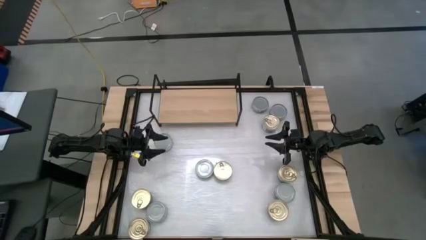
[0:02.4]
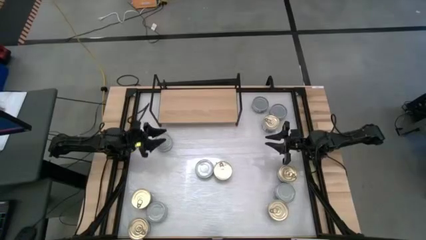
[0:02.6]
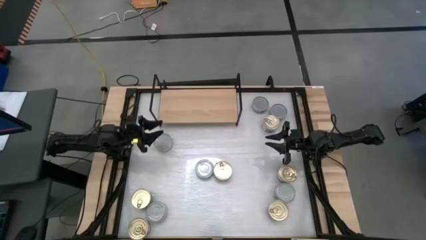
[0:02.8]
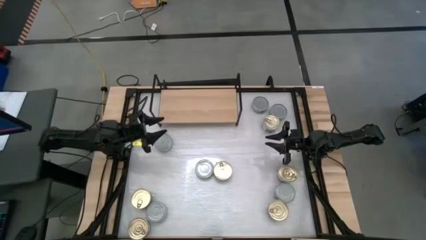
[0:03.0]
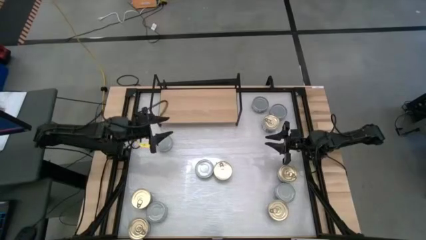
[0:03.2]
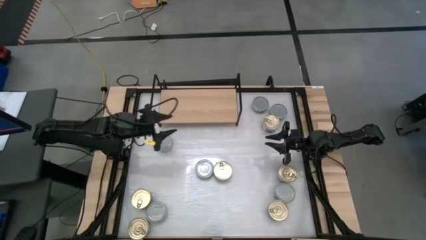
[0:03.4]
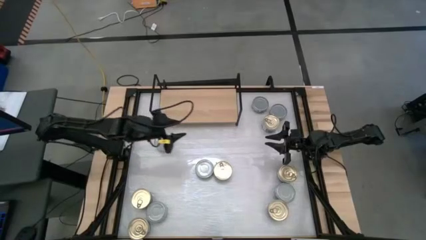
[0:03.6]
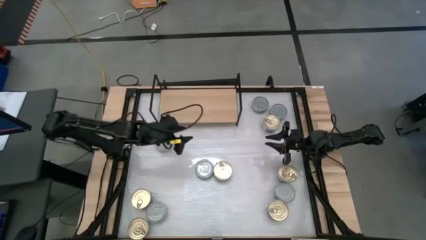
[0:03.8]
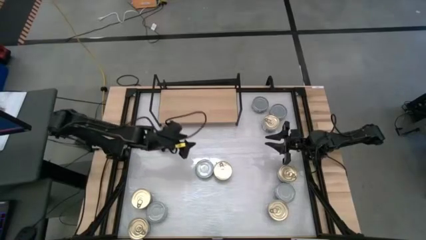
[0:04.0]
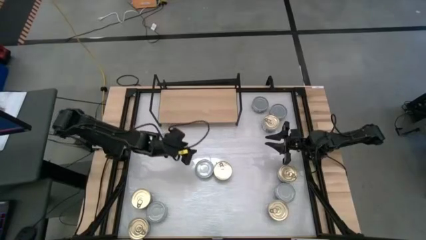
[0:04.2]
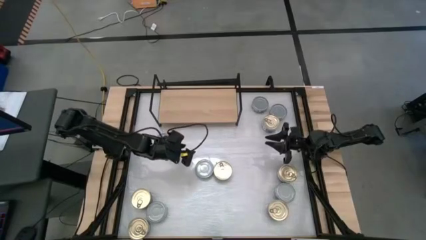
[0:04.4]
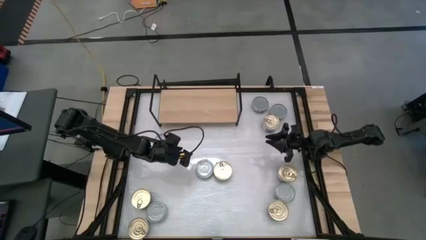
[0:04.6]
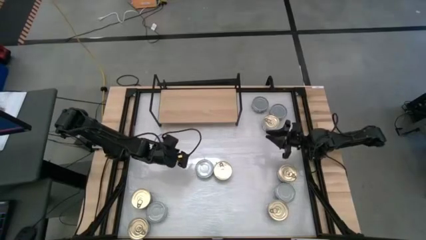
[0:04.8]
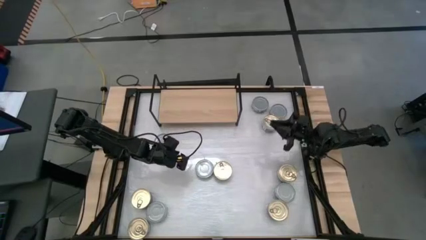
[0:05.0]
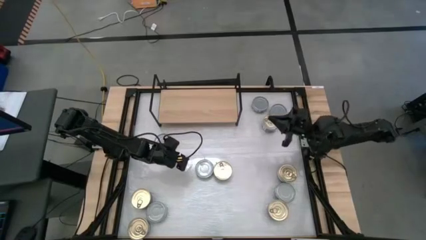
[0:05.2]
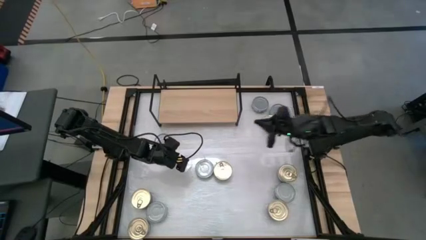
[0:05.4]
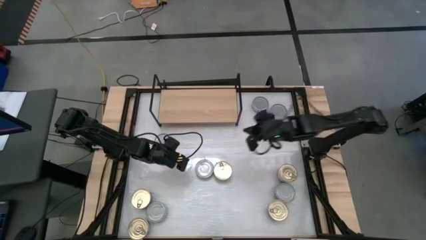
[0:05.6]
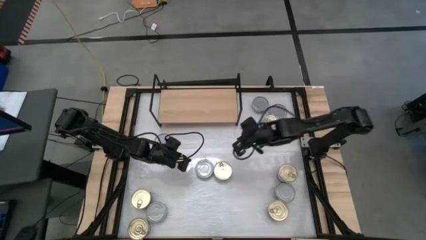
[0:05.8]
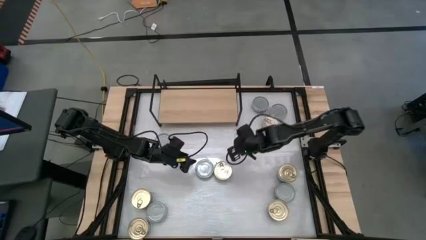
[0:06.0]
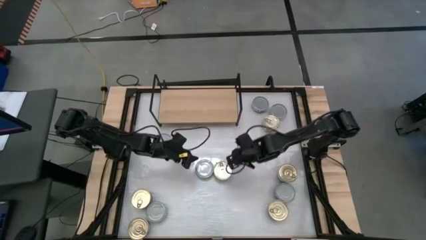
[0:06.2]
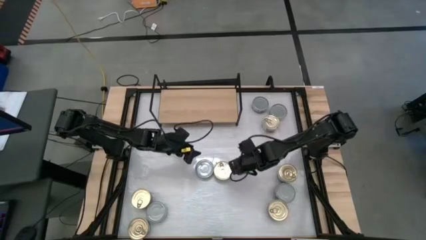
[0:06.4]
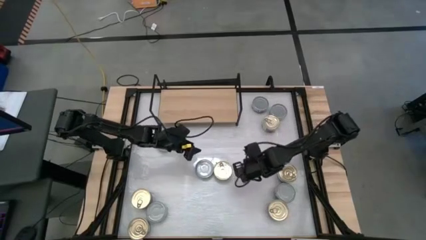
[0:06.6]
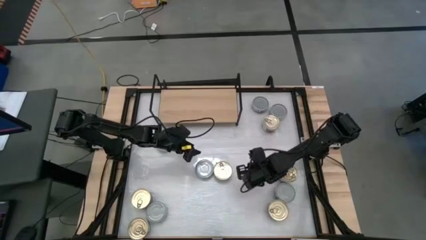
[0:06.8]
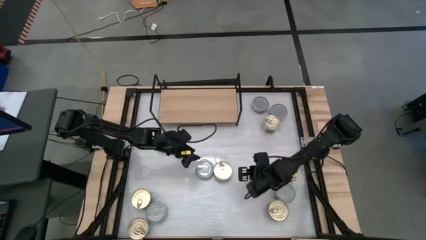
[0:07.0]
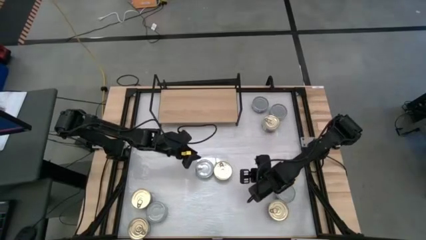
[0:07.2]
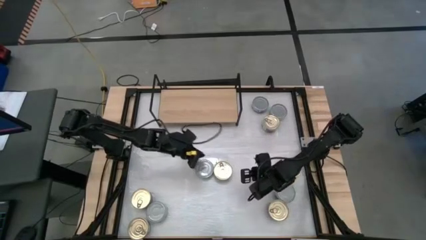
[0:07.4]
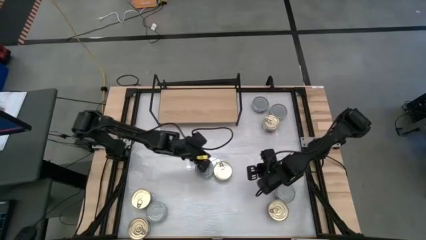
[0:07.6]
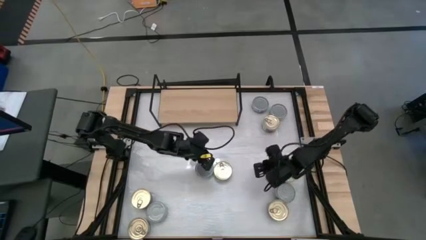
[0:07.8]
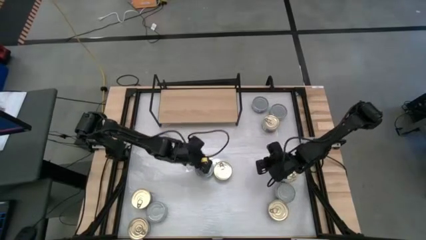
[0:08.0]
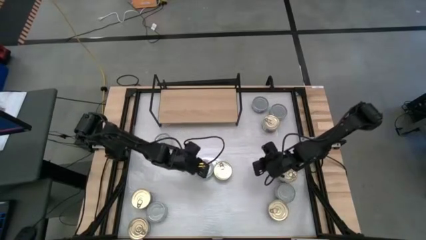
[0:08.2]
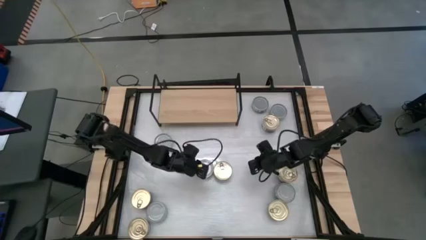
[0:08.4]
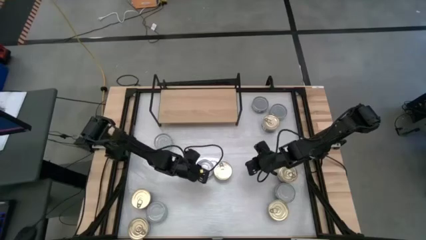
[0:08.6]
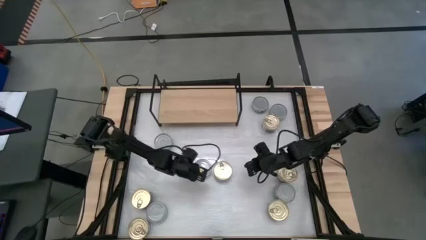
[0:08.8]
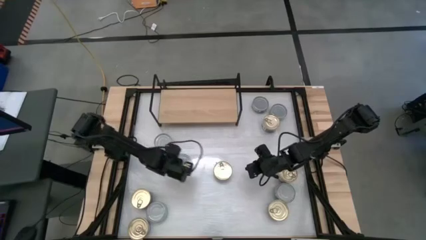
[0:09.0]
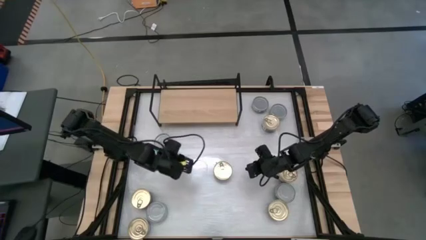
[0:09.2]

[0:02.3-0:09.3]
Task: Stack canned seafood by type on shelf
Move the green tuna can to the middle left

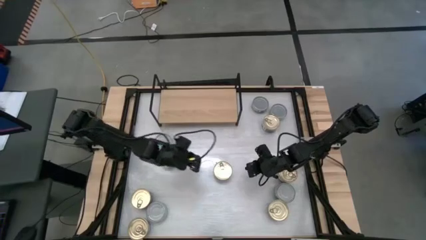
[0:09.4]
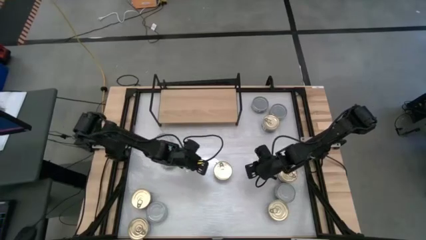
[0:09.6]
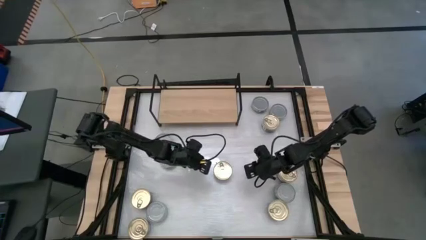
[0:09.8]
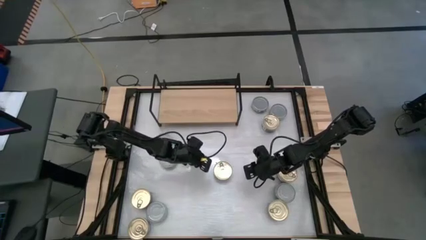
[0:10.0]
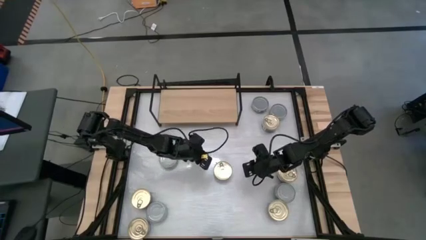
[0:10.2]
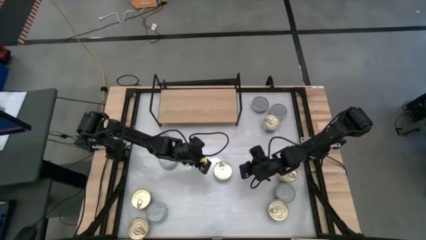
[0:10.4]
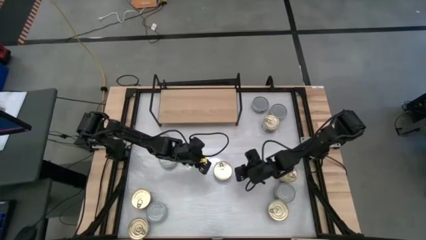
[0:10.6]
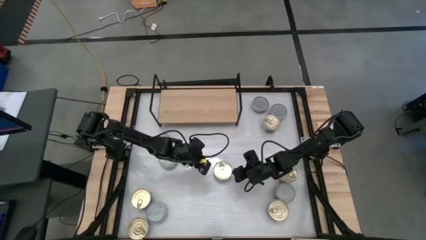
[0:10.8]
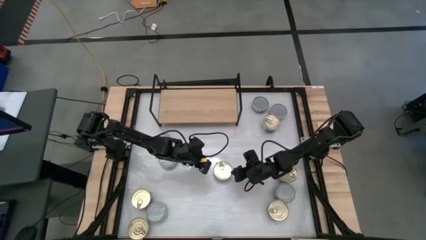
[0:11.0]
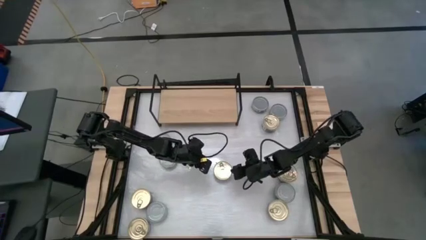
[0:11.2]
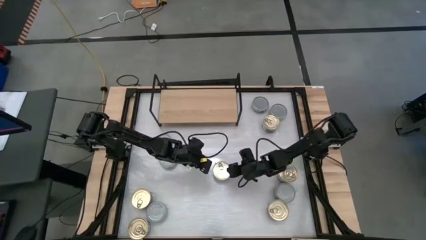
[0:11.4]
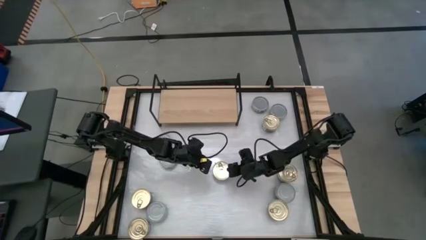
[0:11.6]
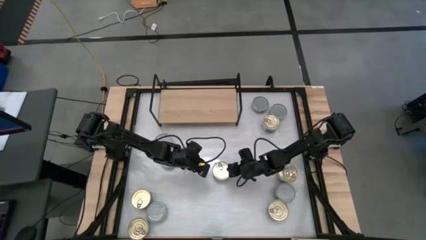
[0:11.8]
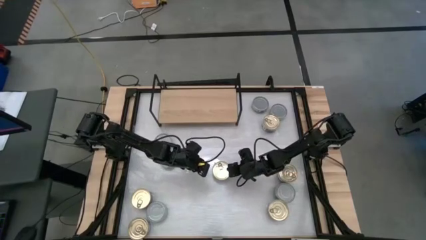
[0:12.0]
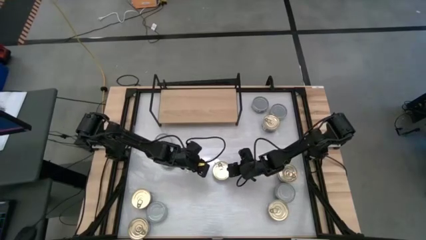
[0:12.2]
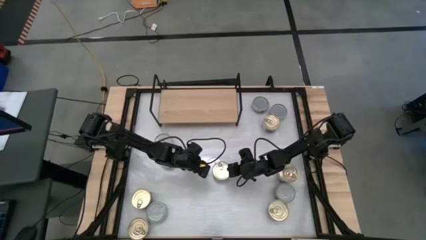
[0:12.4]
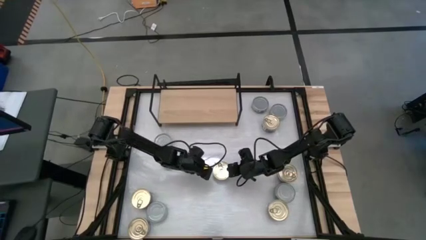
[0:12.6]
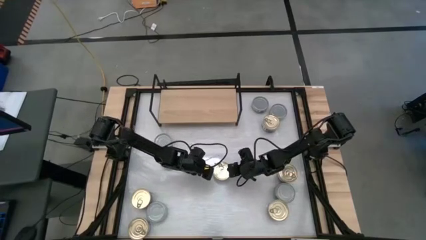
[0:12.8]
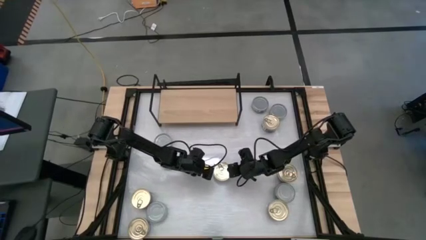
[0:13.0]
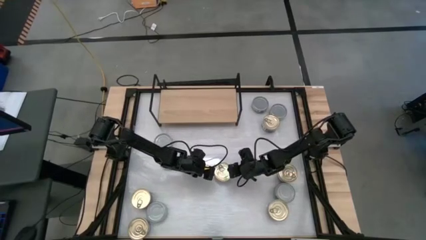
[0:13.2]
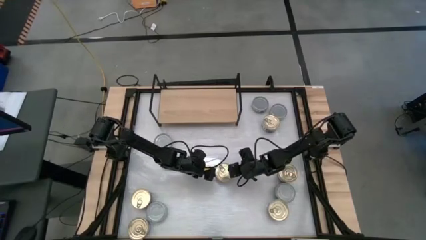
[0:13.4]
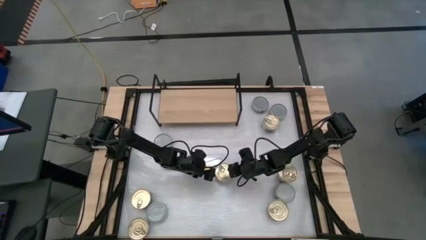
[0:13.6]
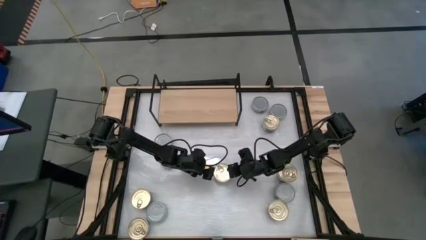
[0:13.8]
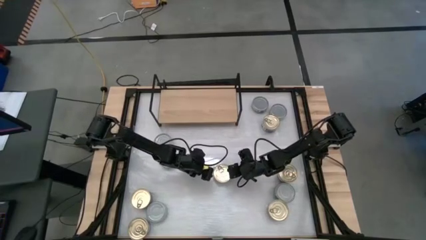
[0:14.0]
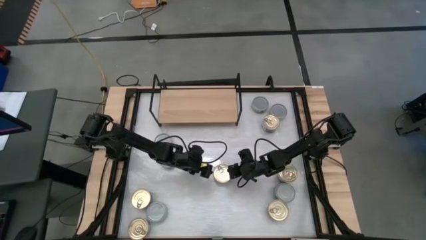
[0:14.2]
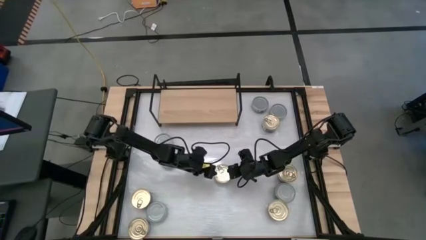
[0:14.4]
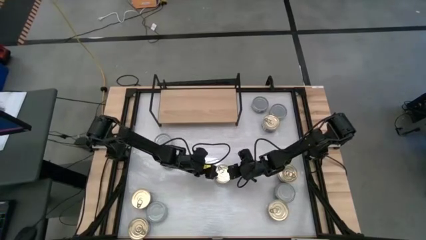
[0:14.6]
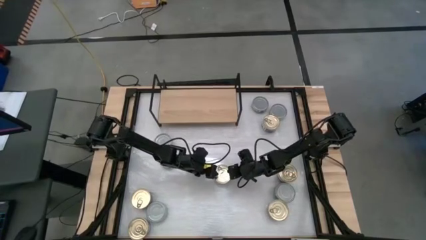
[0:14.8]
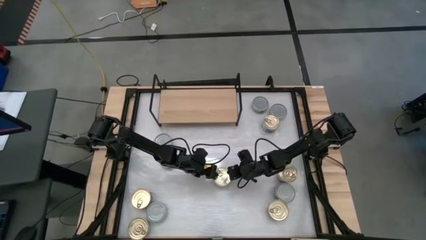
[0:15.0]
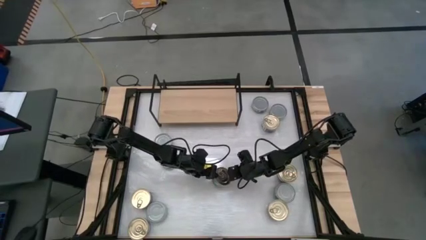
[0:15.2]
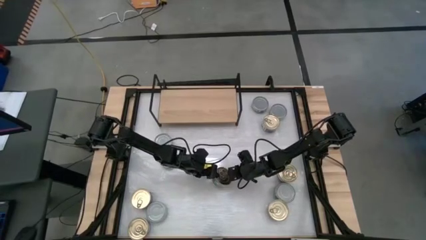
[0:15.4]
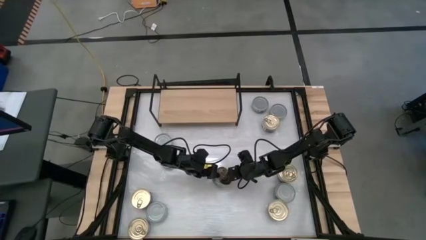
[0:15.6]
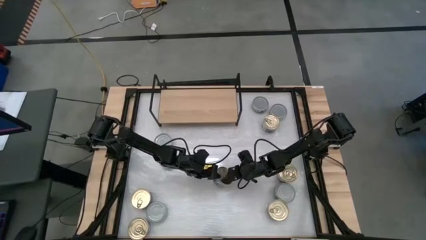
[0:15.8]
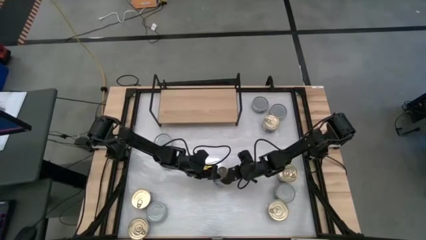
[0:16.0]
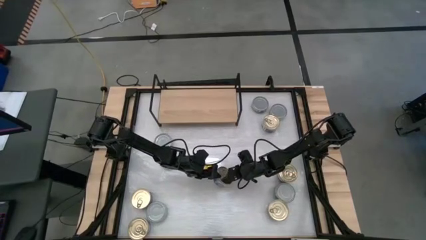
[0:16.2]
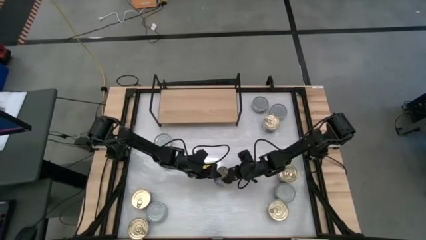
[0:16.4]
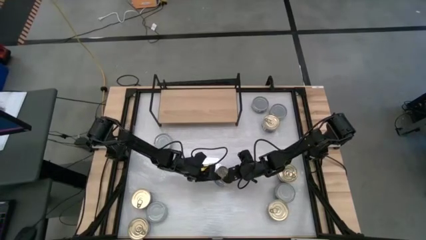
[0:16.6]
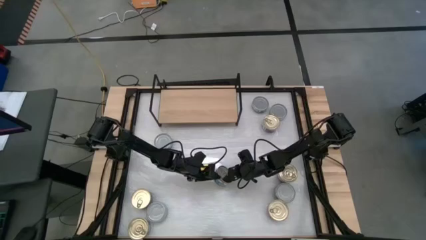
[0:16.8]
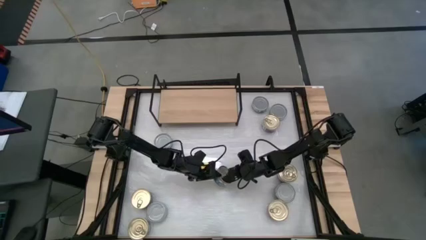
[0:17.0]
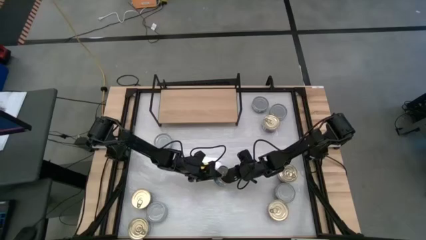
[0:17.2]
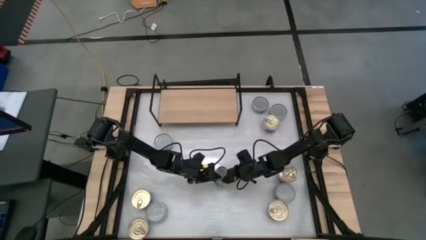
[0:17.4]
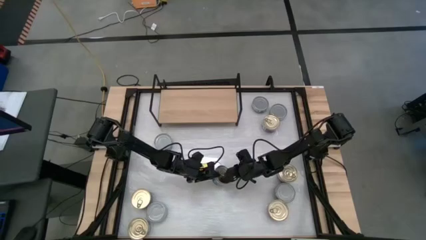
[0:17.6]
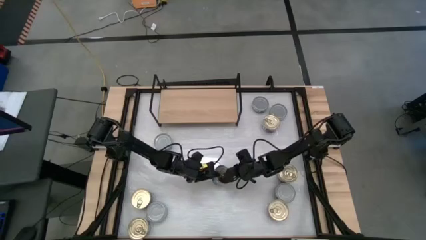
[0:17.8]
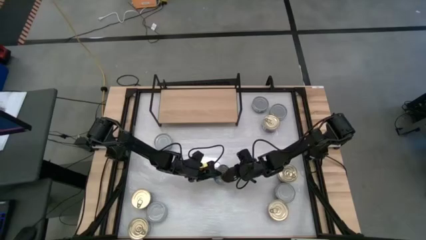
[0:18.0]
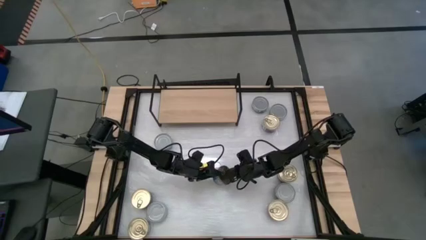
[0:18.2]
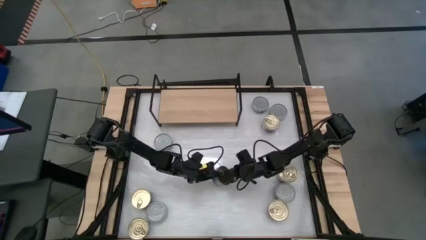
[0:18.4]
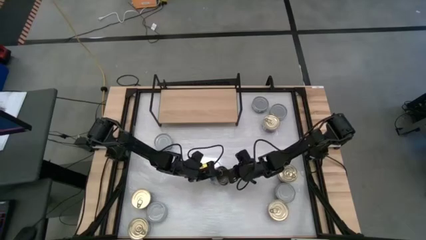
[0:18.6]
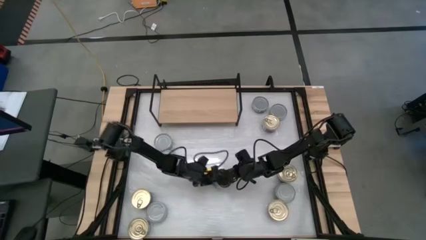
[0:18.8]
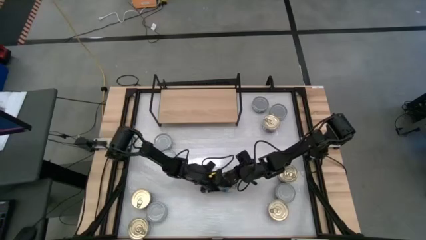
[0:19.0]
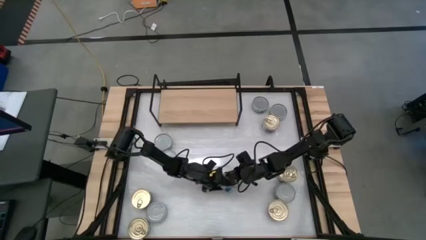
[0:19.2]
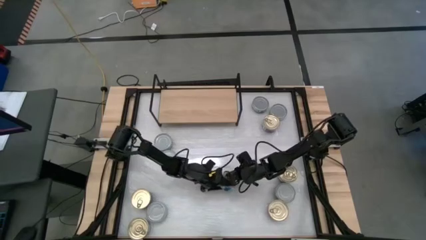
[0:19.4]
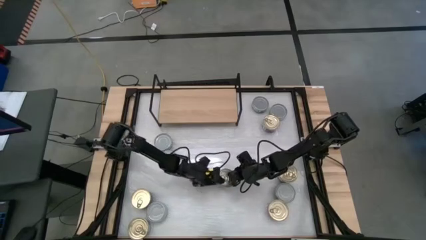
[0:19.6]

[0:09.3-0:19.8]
Put the blue tuna can on the shelf
